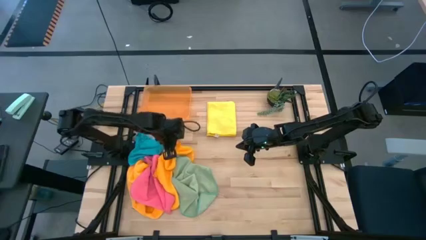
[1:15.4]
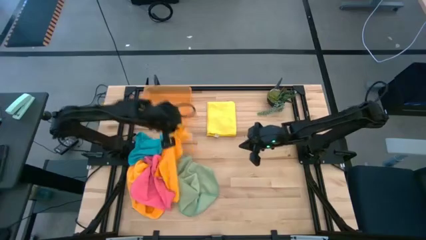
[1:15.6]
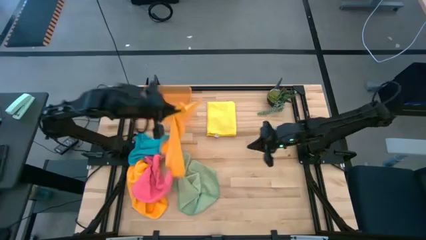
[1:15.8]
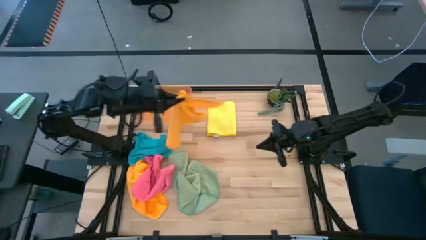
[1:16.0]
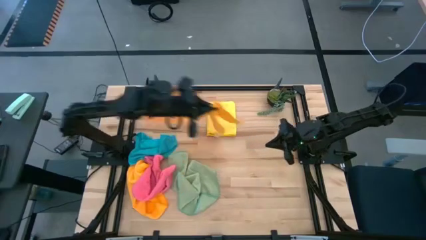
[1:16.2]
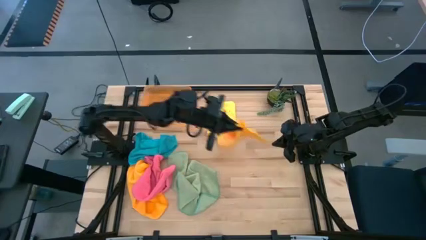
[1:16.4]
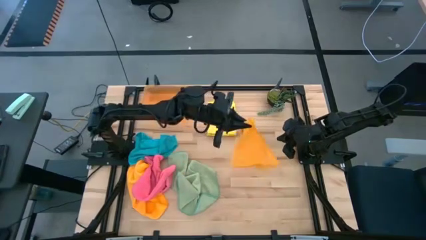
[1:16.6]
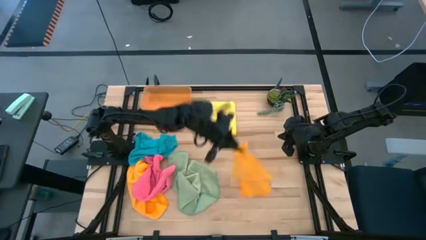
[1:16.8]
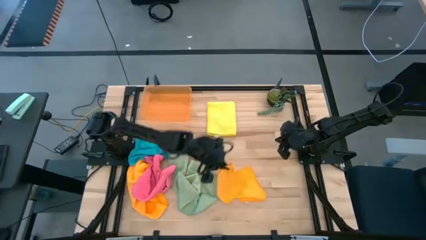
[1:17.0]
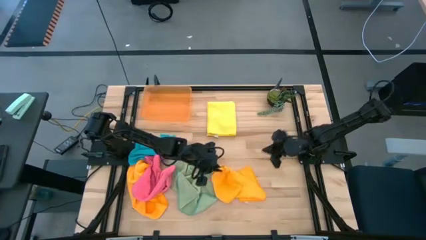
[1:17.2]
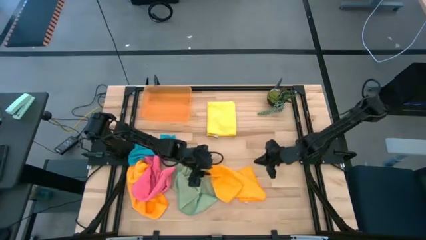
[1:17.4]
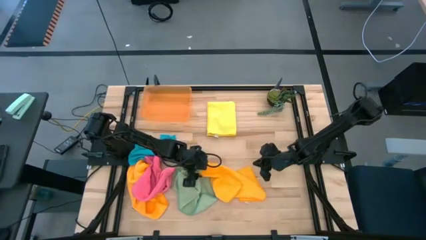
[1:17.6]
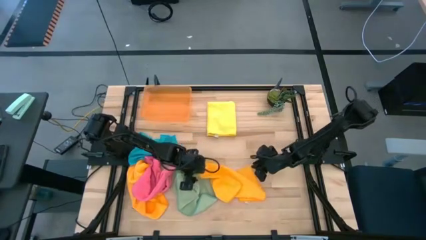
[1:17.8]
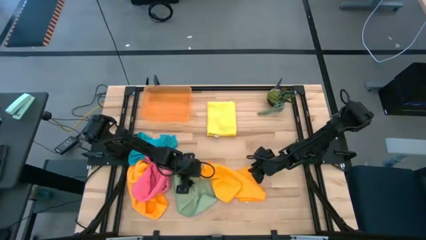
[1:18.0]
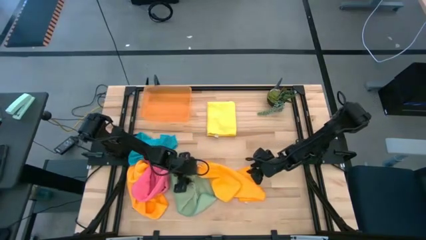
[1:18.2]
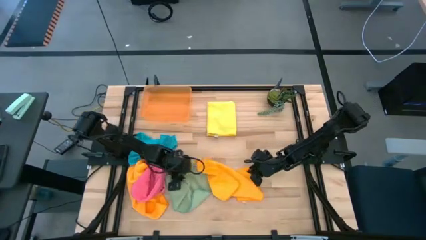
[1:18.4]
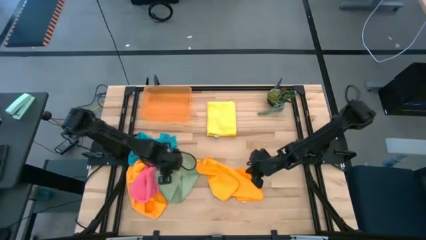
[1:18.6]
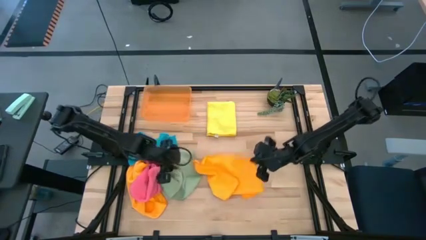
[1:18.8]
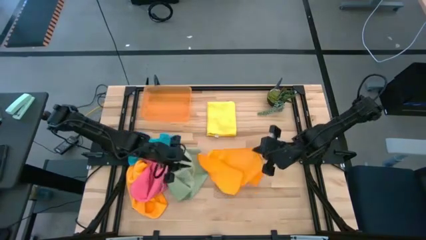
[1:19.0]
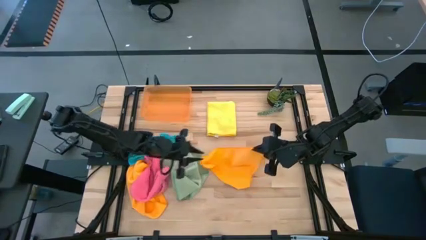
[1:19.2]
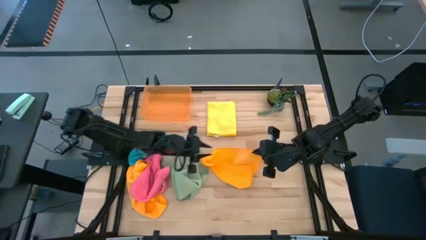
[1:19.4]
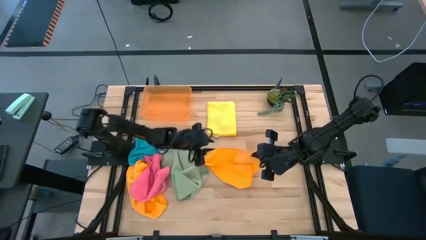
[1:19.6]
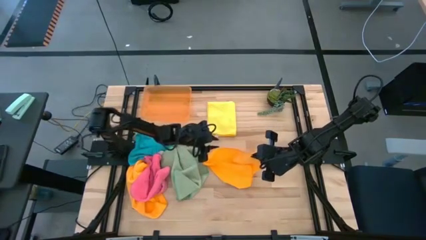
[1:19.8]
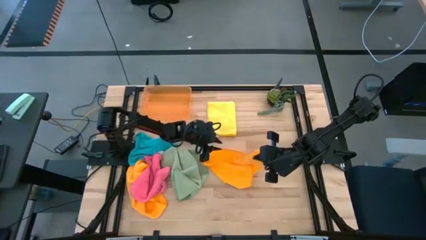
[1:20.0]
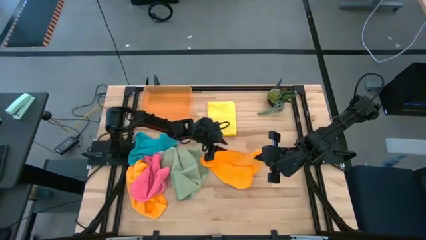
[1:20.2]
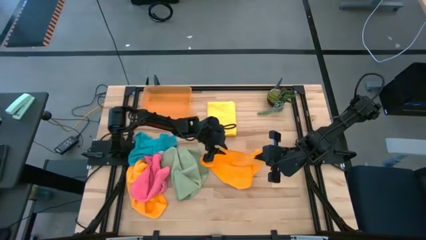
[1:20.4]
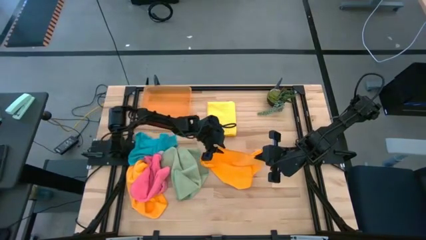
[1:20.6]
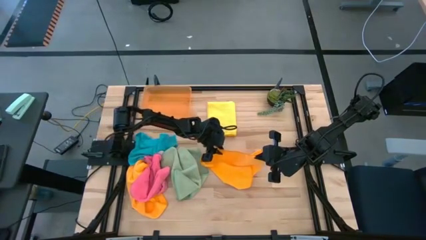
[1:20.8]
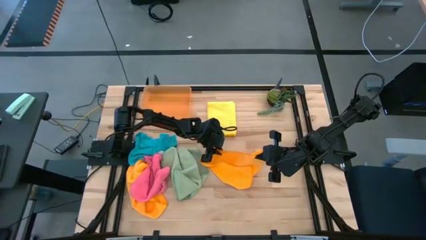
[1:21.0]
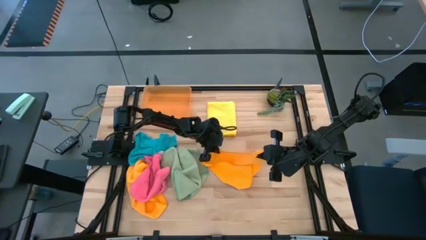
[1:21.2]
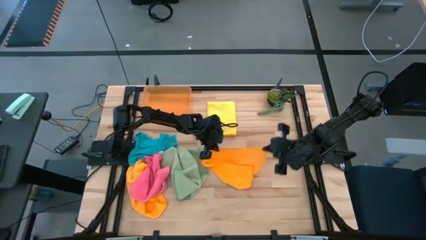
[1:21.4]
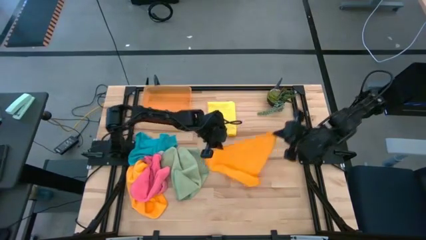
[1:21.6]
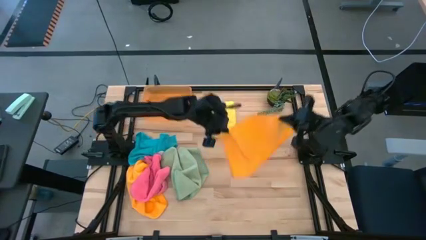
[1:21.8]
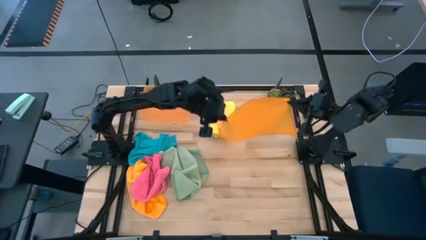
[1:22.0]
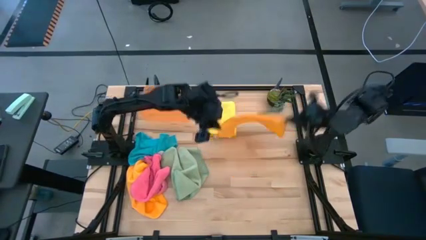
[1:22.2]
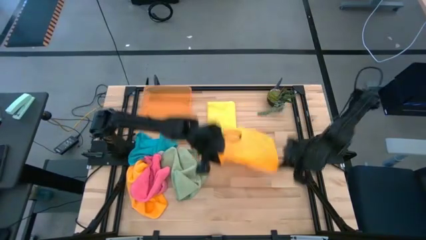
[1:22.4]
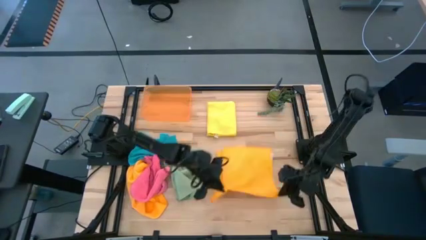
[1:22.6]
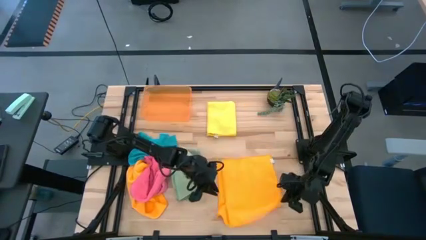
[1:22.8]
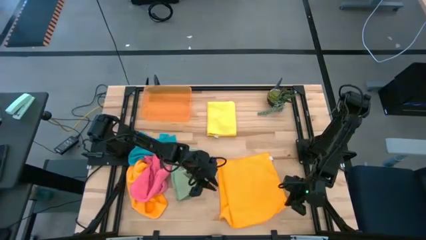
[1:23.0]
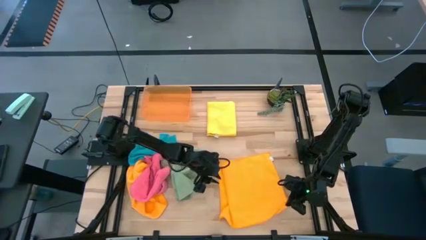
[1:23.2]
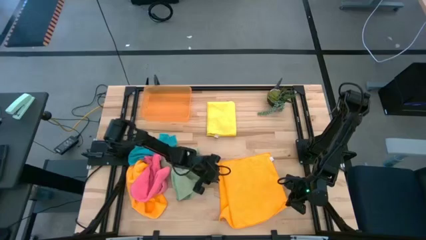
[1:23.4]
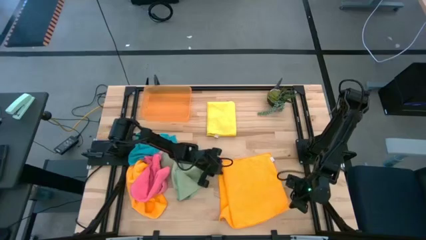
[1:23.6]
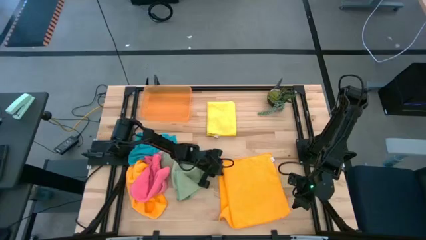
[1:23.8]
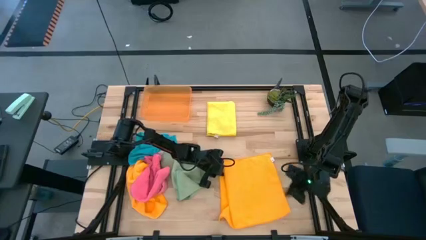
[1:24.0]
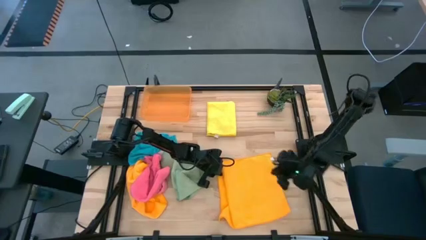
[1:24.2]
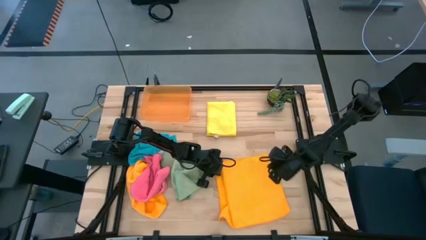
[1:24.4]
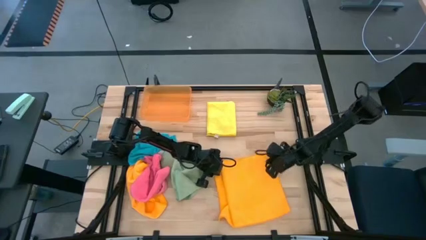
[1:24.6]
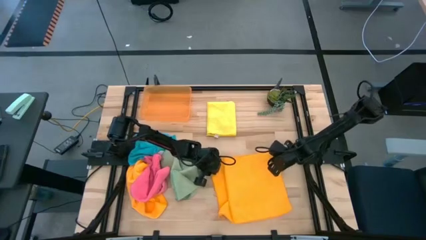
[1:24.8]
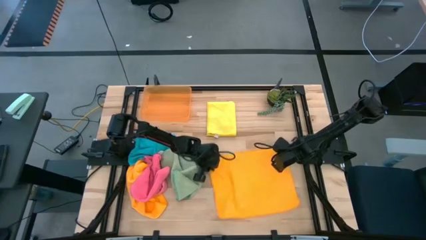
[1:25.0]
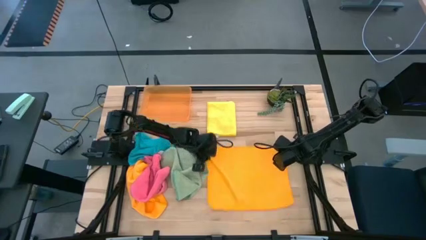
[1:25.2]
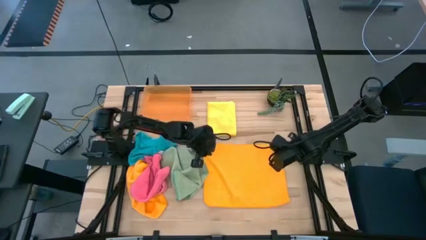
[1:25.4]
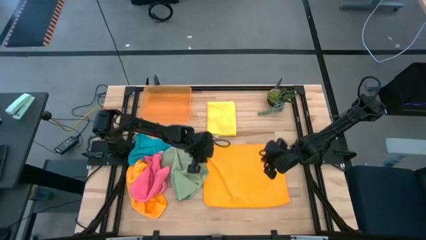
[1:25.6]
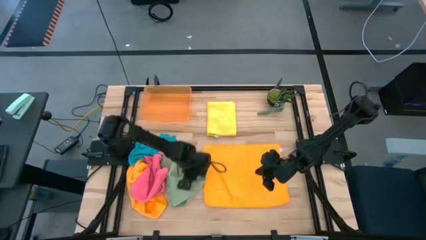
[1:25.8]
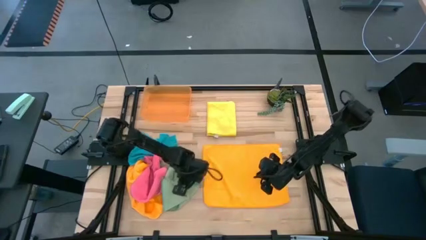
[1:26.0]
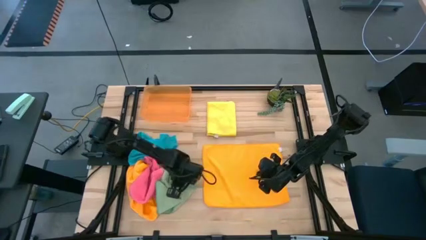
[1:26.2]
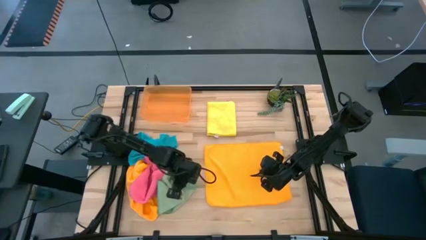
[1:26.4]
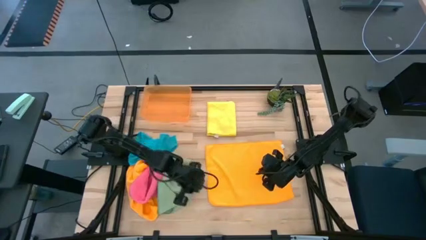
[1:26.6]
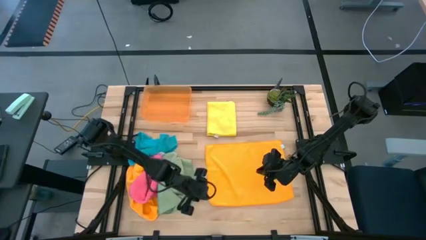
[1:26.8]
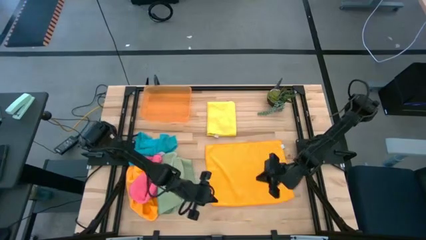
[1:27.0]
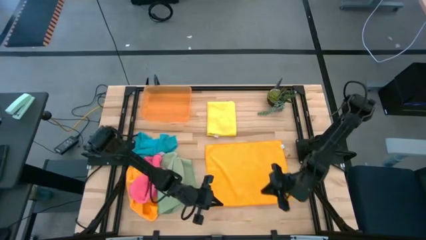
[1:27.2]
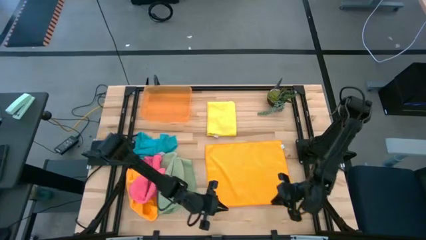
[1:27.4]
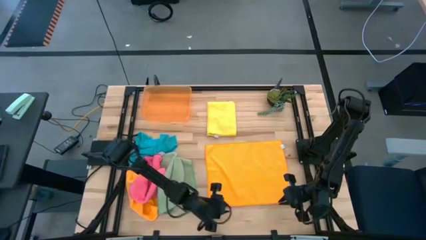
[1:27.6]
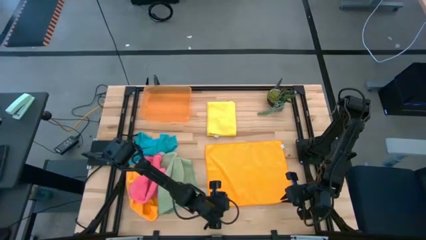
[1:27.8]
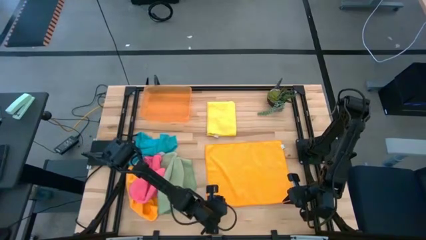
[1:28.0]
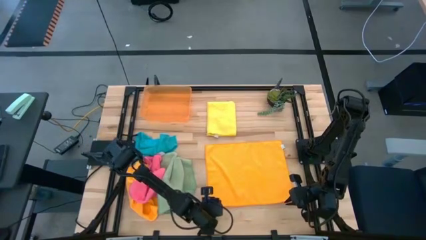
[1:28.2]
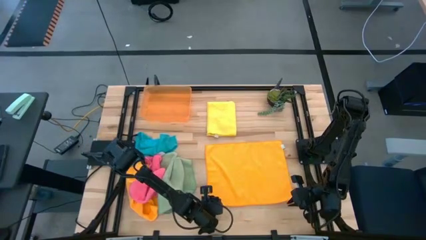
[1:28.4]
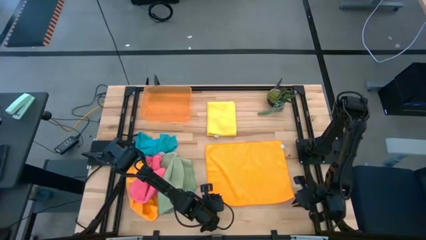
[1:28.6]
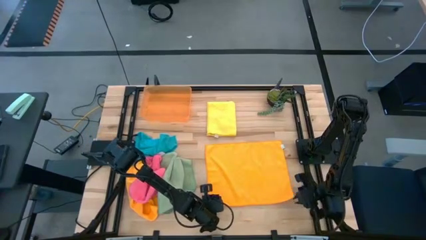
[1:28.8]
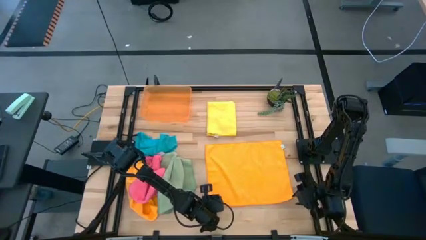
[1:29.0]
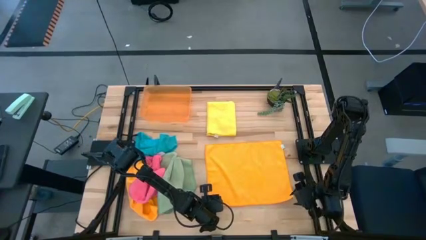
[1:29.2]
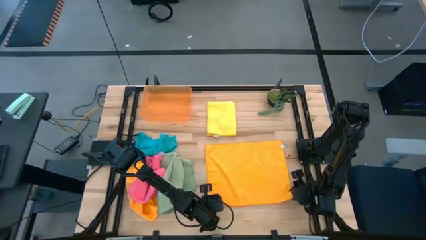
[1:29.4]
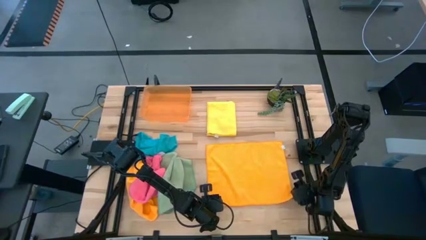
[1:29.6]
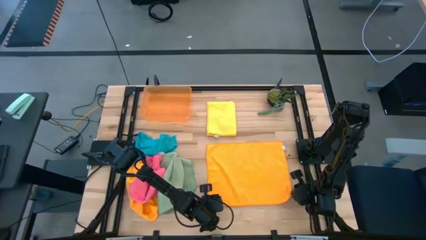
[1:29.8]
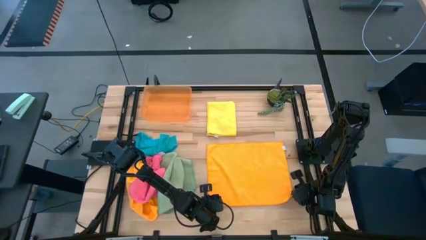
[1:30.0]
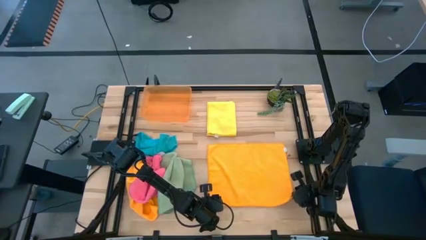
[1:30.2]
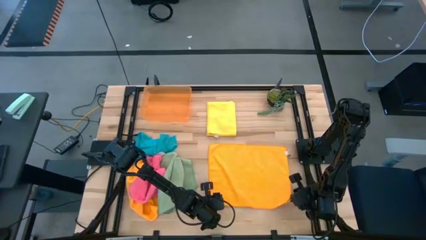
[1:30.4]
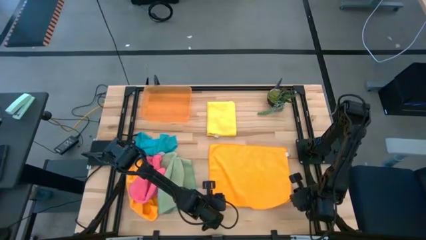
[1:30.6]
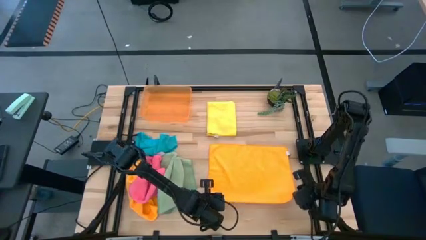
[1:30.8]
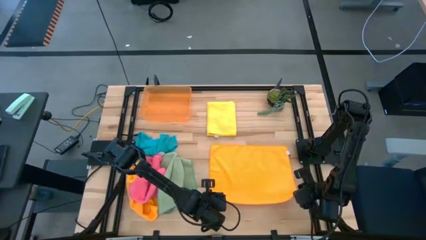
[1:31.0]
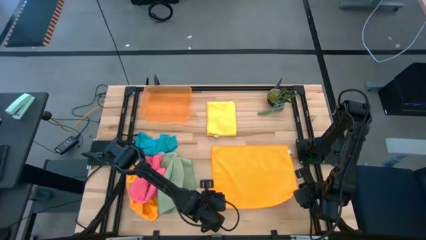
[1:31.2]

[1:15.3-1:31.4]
Task: Fold microfiber towels
Fold the right orange towel
